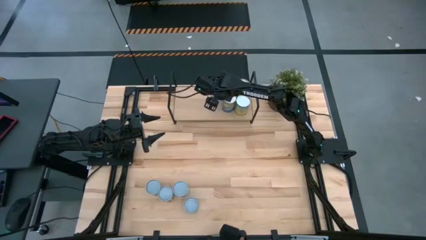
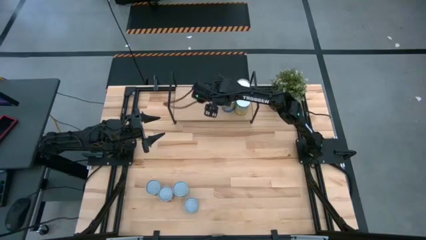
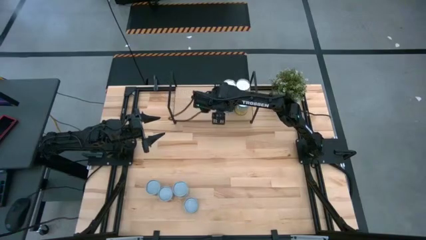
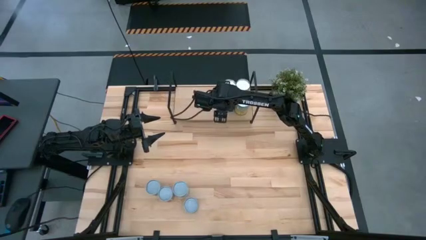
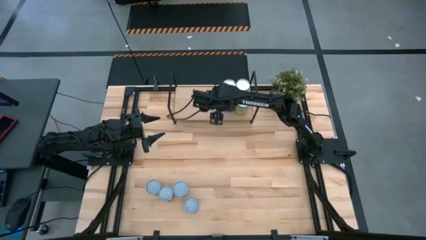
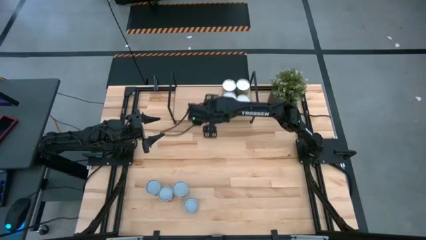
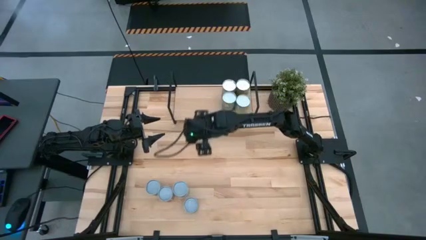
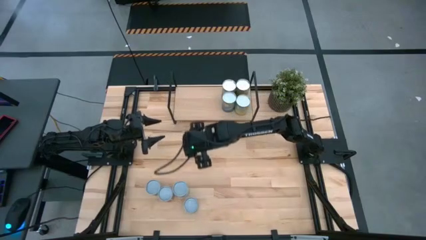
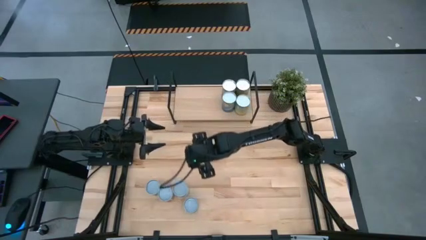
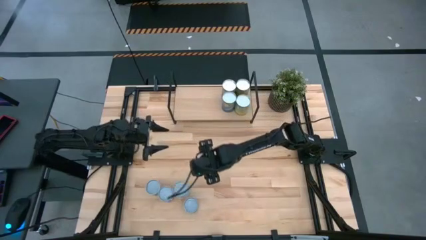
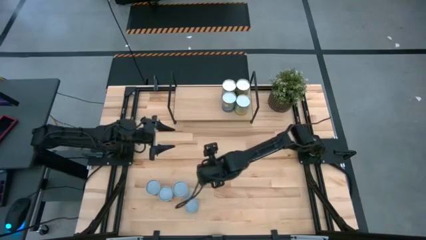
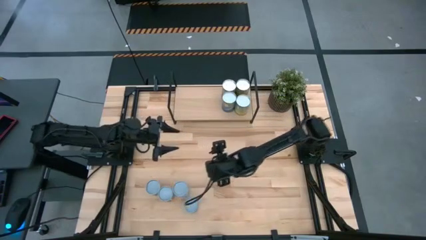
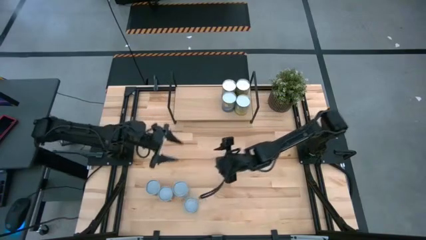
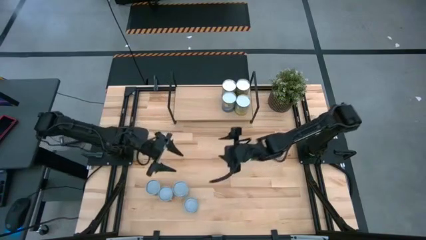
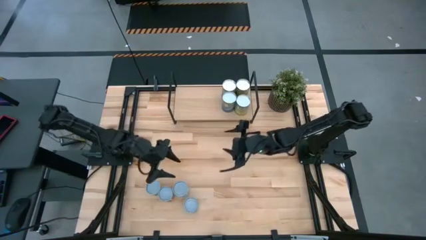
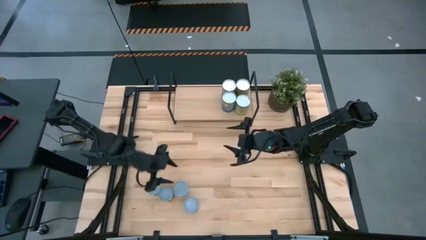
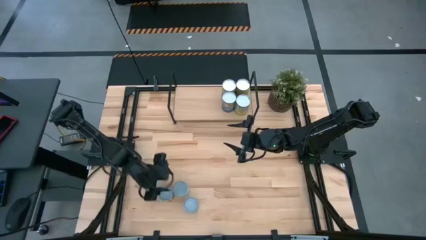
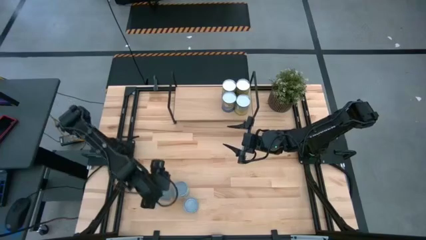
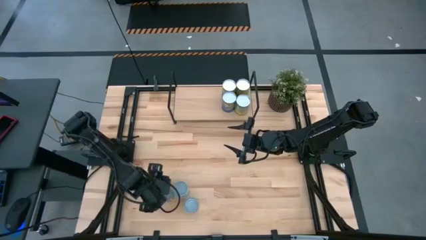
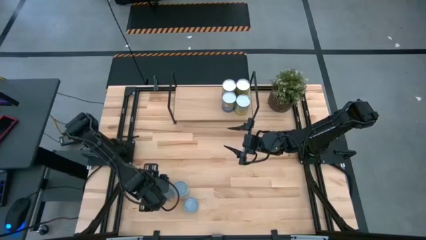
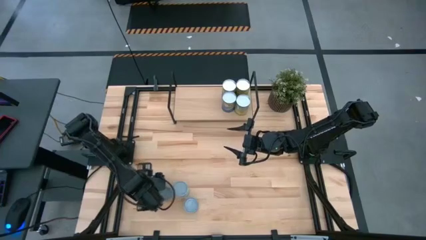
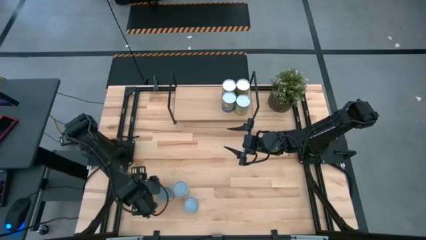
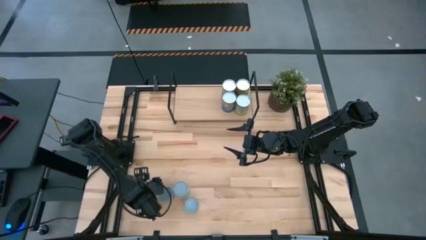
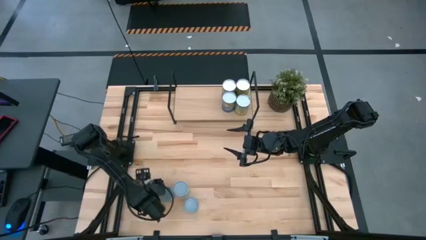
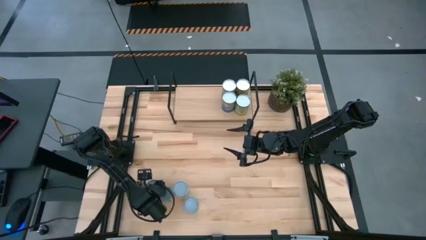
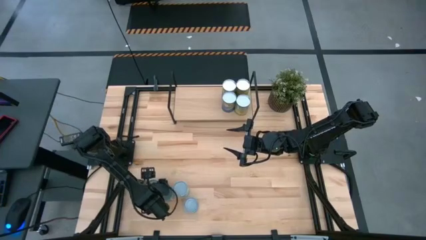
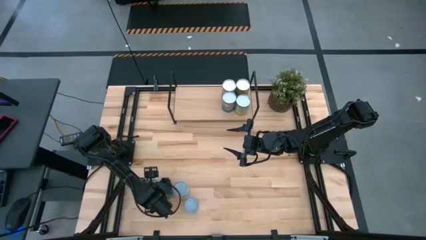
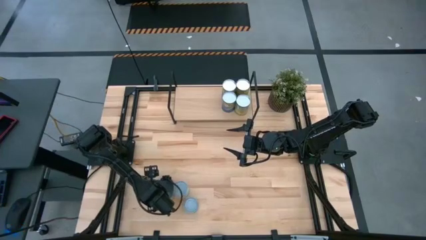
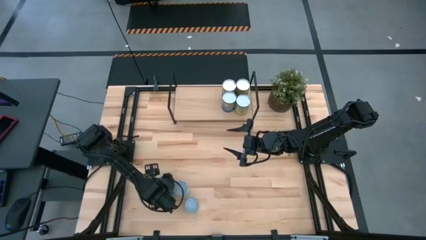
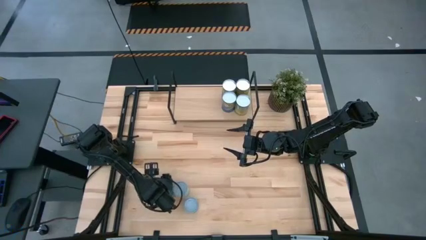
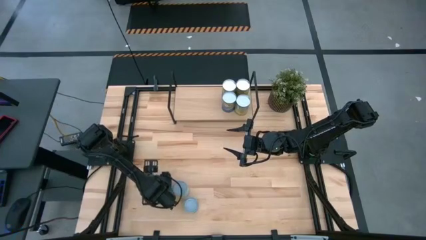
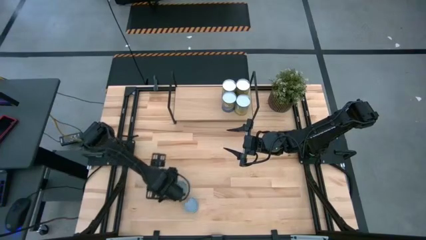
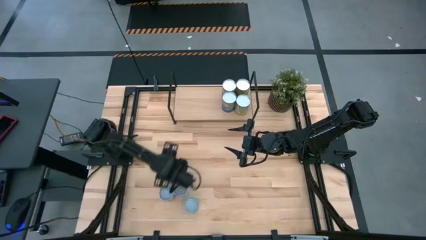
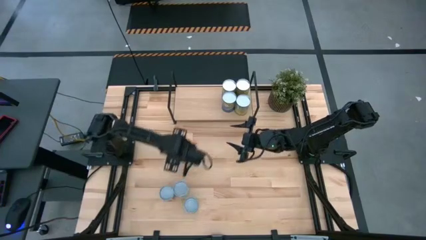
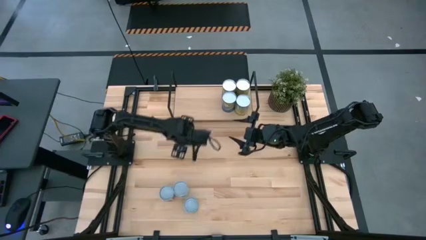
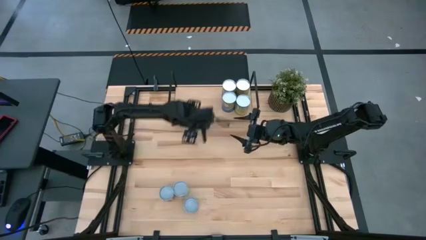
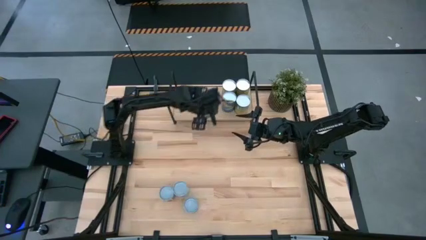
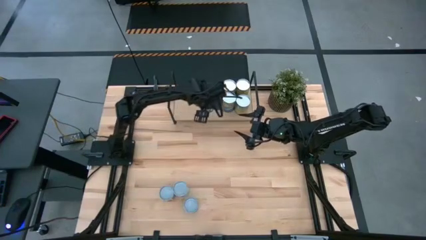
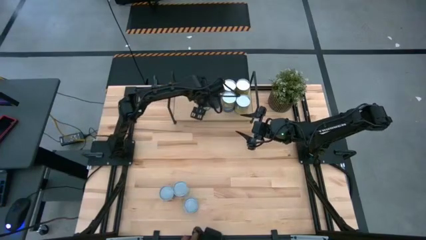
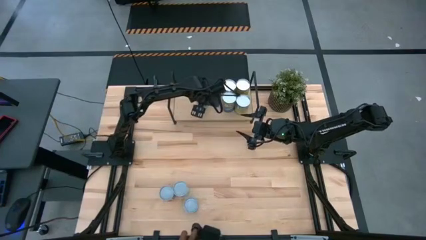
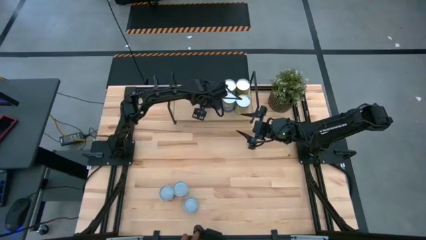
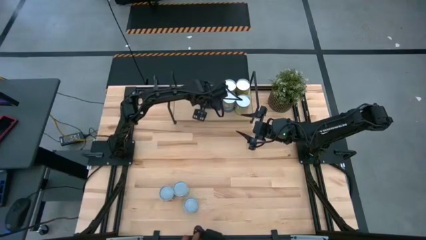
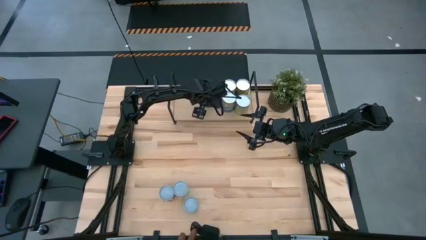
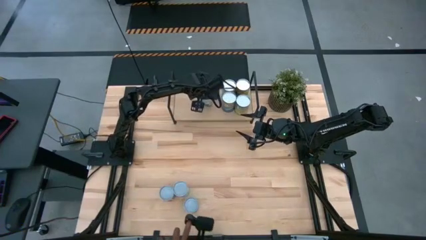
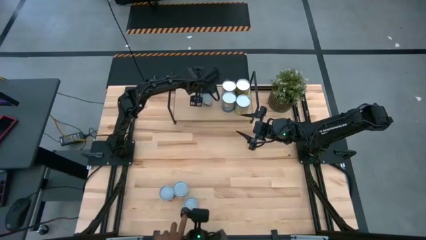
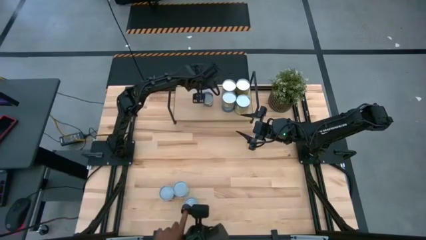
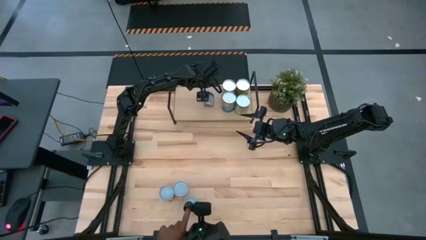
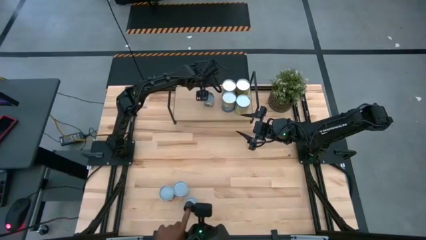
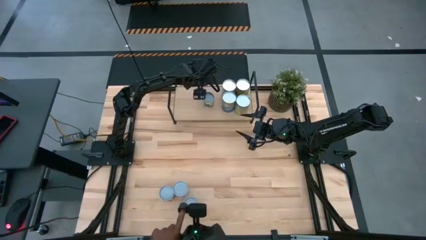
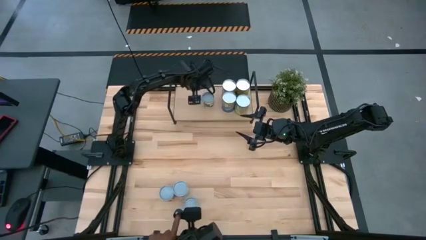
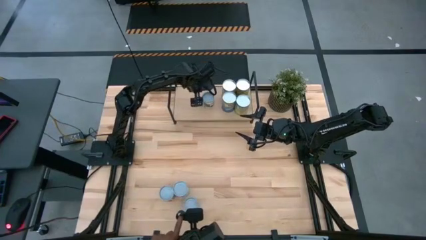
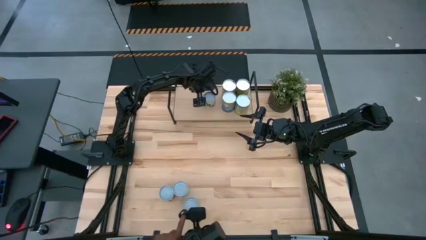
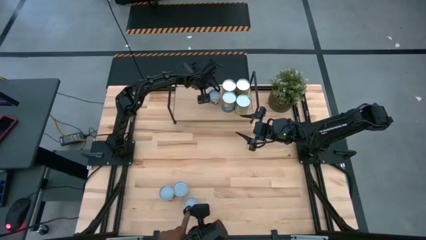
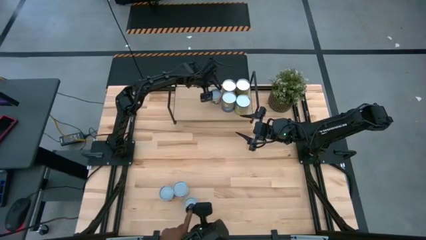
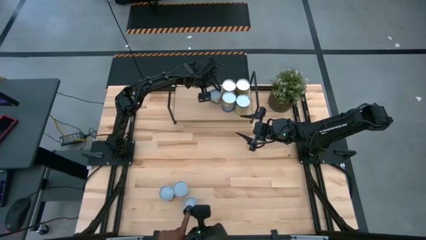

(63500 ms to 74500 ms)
Task: Pick and place cans onto a shelf
Put the small canned peas on the shelf
